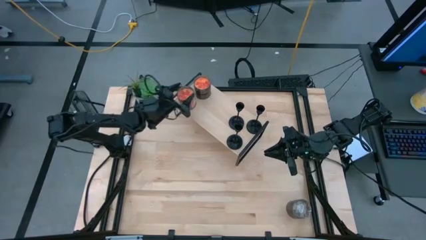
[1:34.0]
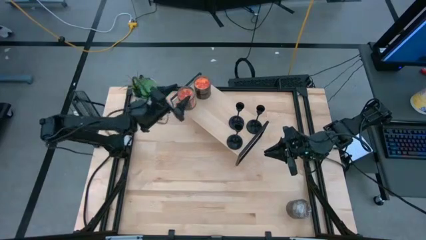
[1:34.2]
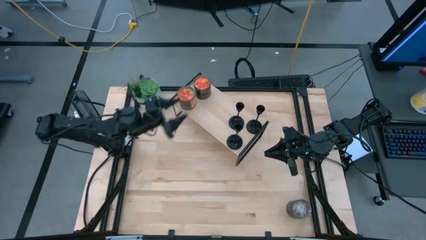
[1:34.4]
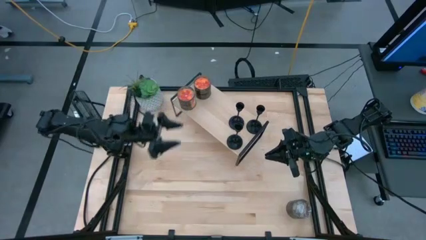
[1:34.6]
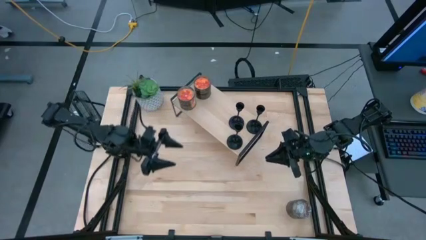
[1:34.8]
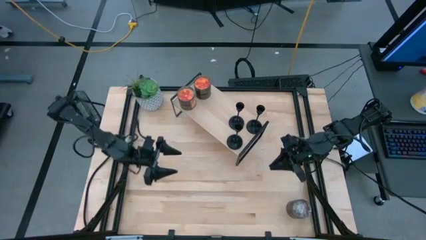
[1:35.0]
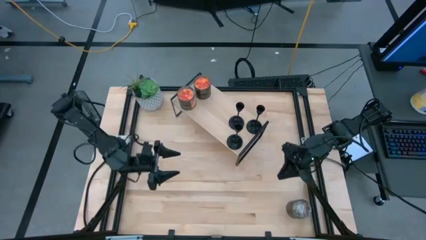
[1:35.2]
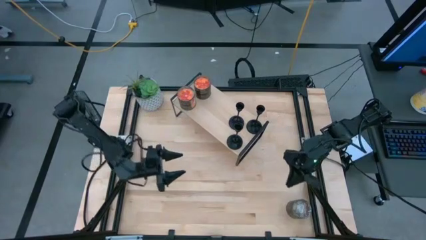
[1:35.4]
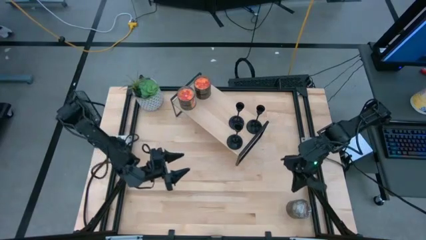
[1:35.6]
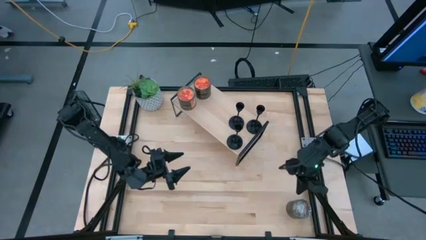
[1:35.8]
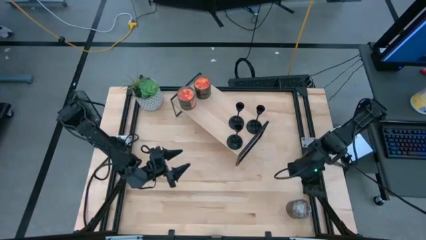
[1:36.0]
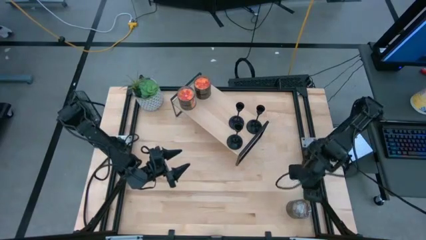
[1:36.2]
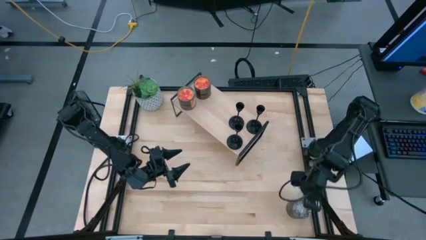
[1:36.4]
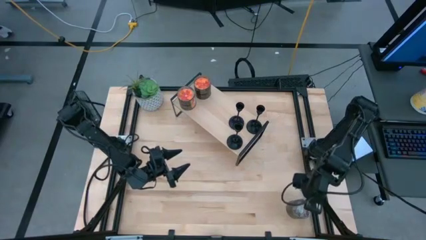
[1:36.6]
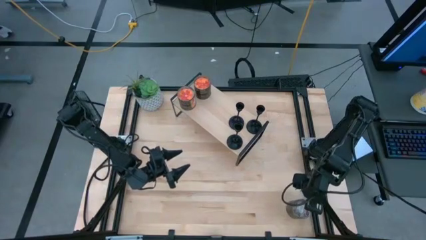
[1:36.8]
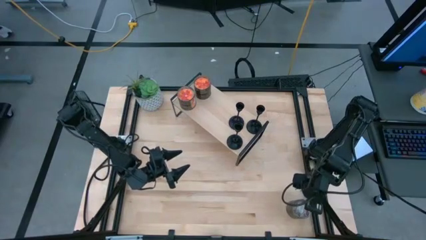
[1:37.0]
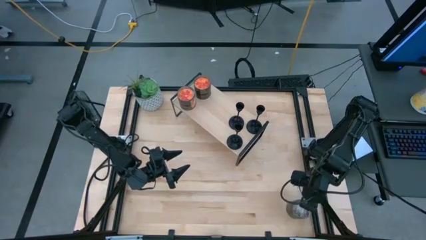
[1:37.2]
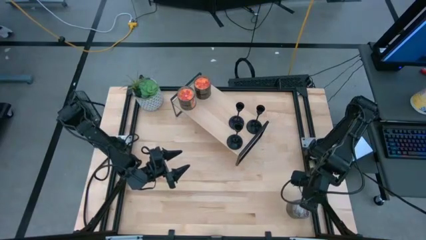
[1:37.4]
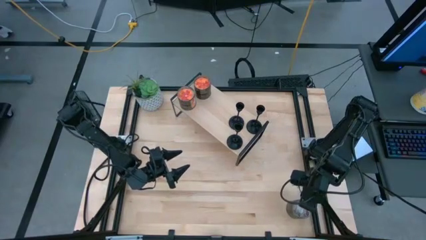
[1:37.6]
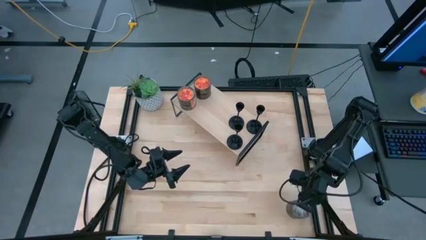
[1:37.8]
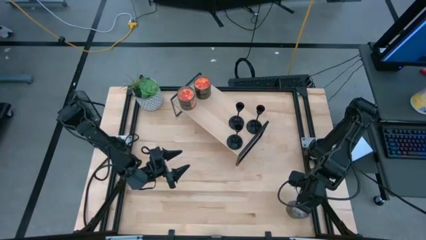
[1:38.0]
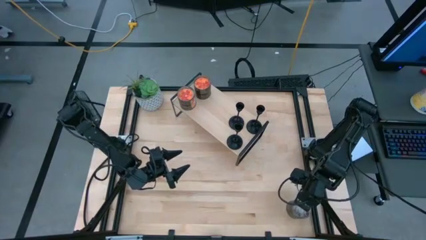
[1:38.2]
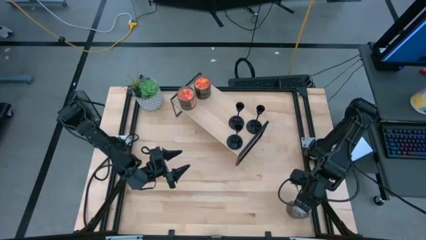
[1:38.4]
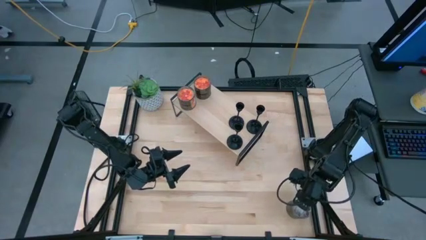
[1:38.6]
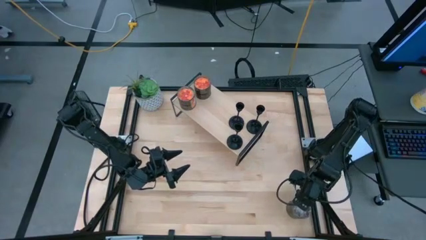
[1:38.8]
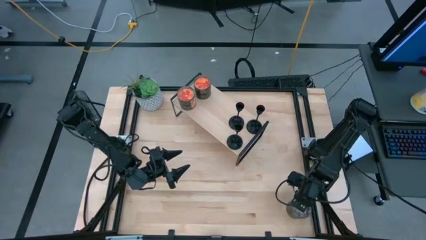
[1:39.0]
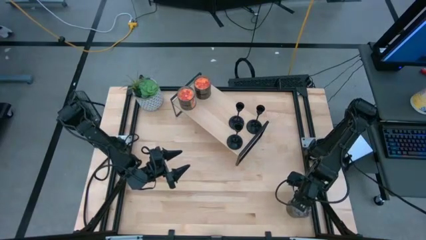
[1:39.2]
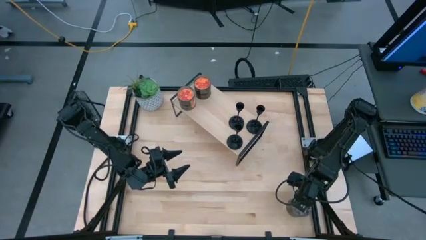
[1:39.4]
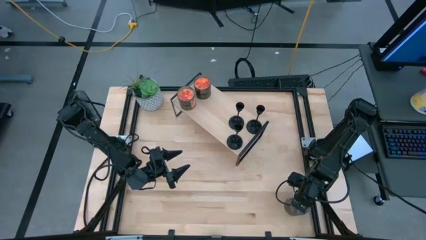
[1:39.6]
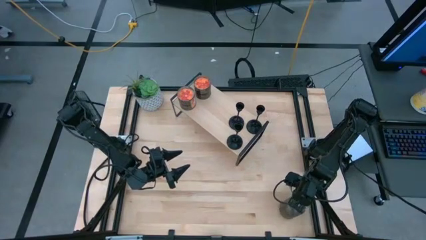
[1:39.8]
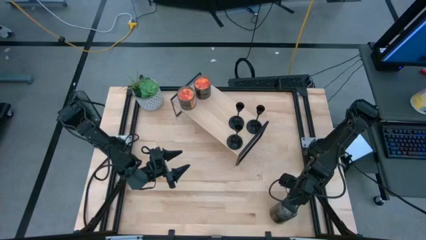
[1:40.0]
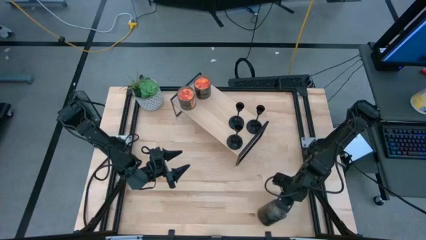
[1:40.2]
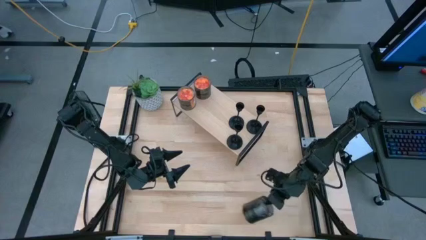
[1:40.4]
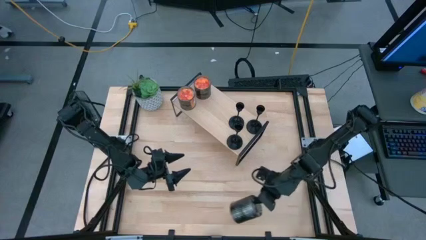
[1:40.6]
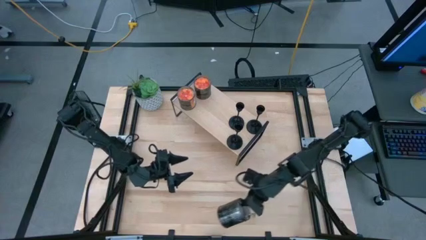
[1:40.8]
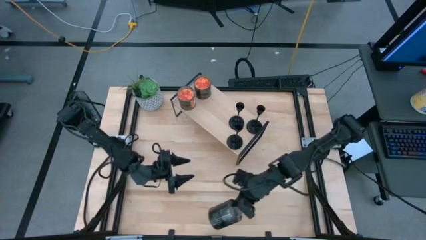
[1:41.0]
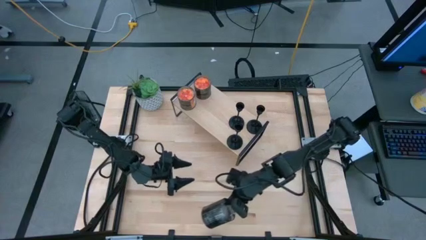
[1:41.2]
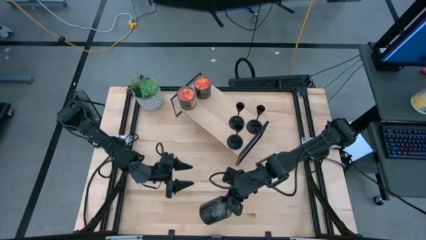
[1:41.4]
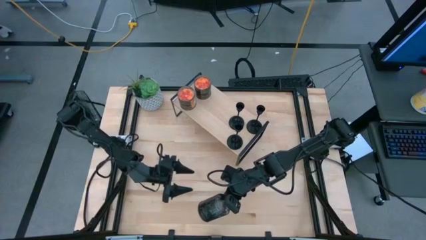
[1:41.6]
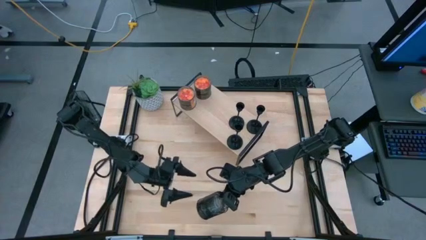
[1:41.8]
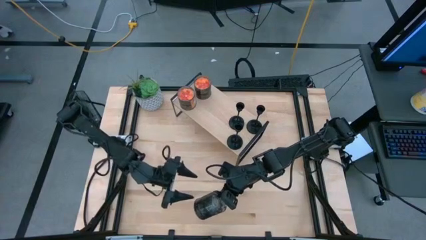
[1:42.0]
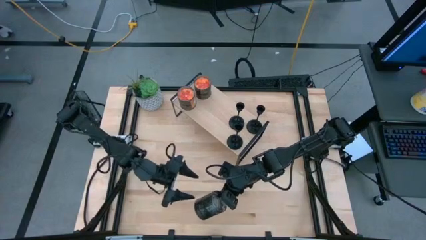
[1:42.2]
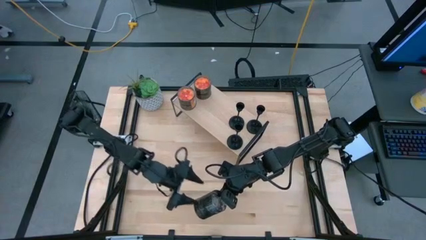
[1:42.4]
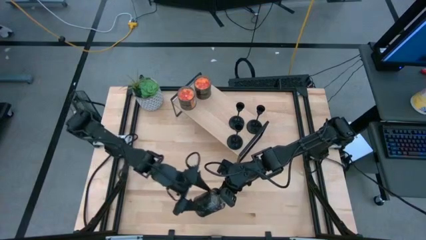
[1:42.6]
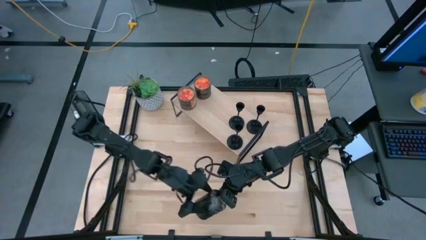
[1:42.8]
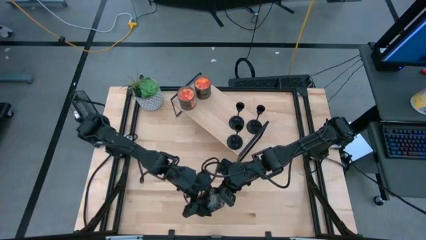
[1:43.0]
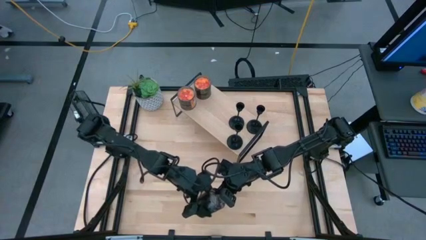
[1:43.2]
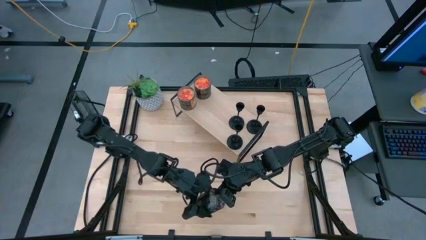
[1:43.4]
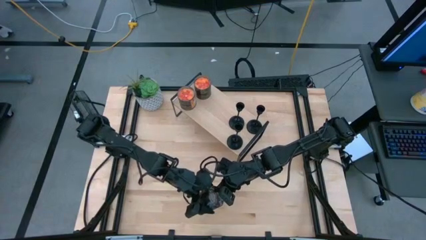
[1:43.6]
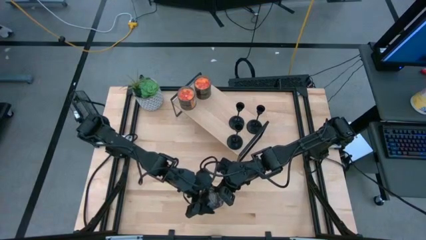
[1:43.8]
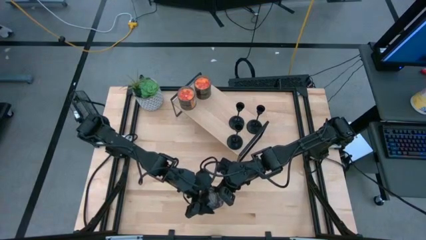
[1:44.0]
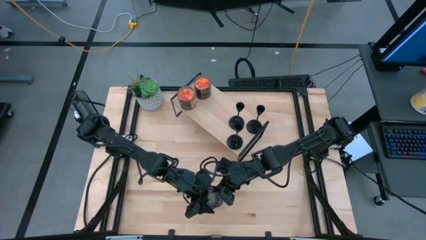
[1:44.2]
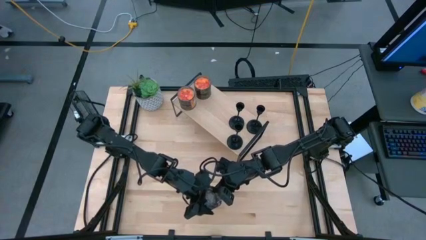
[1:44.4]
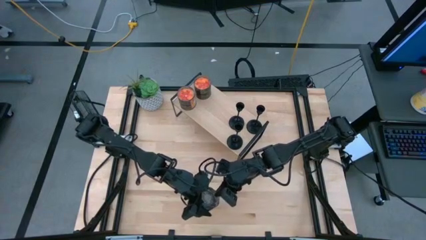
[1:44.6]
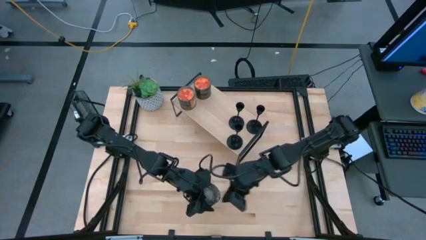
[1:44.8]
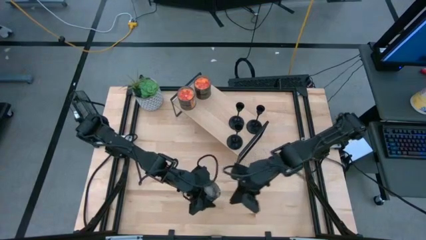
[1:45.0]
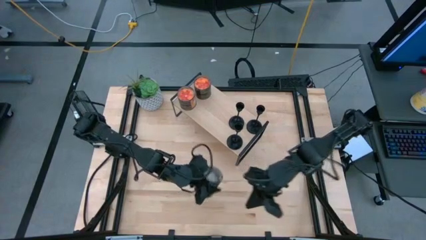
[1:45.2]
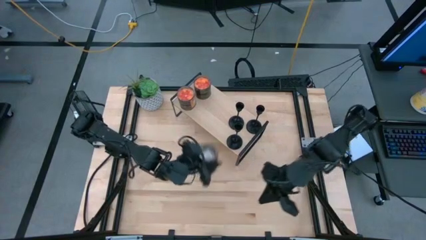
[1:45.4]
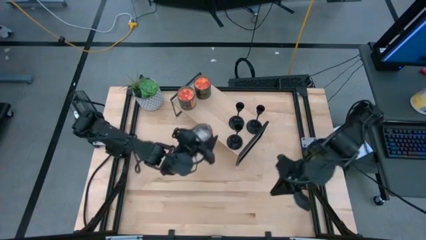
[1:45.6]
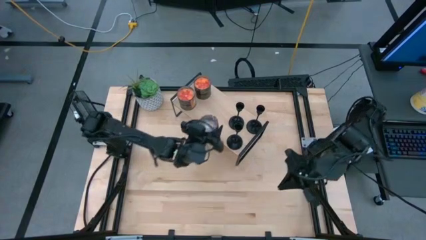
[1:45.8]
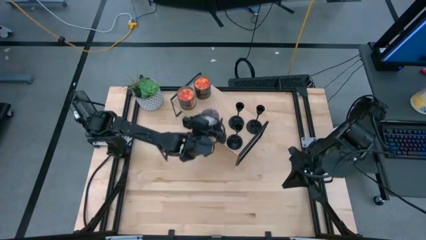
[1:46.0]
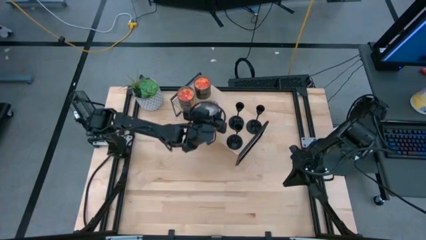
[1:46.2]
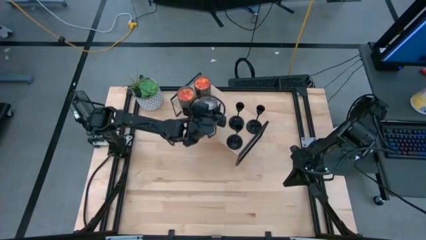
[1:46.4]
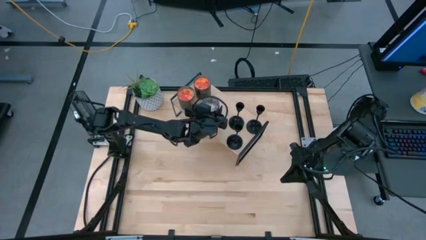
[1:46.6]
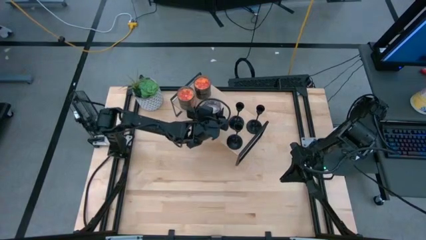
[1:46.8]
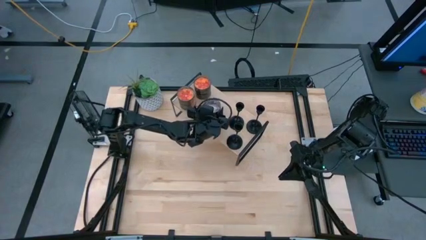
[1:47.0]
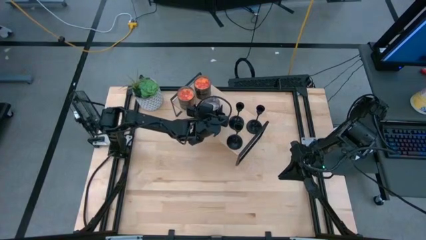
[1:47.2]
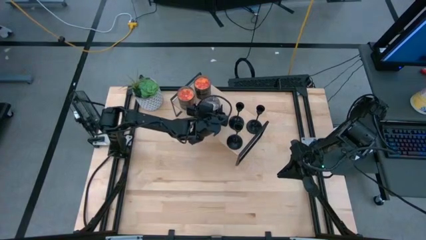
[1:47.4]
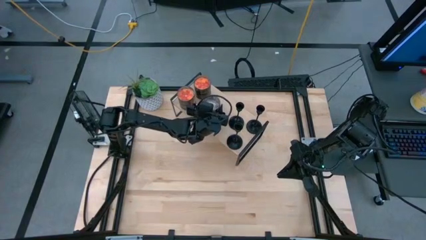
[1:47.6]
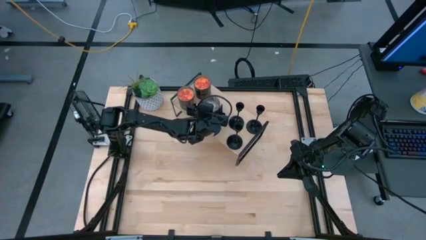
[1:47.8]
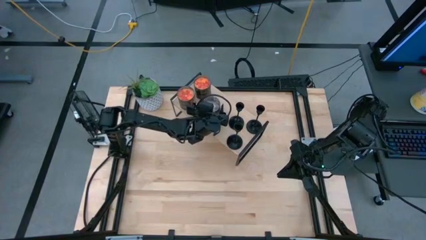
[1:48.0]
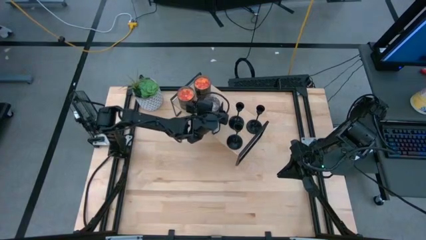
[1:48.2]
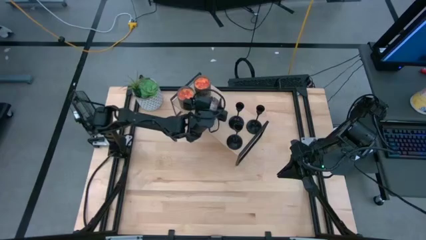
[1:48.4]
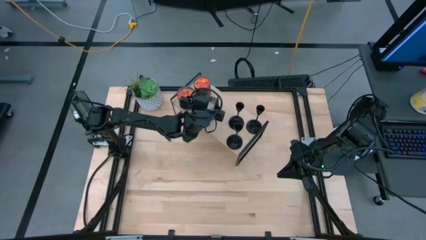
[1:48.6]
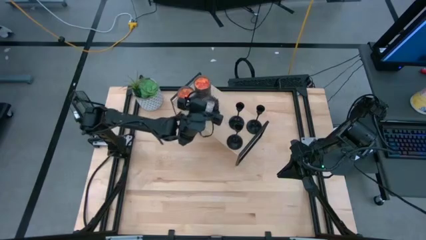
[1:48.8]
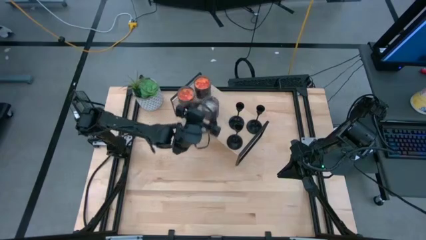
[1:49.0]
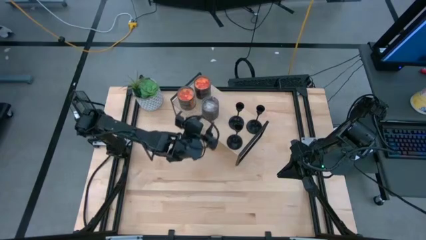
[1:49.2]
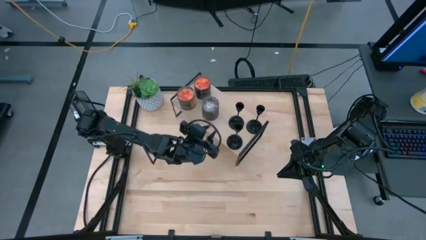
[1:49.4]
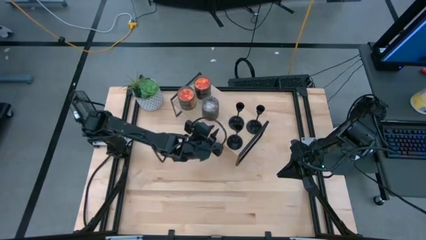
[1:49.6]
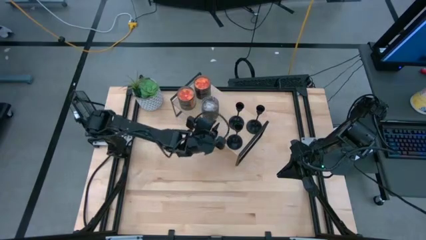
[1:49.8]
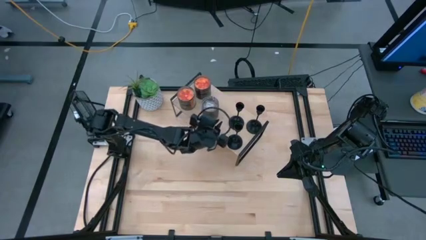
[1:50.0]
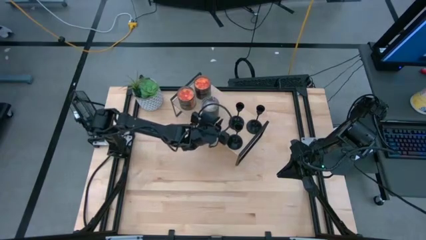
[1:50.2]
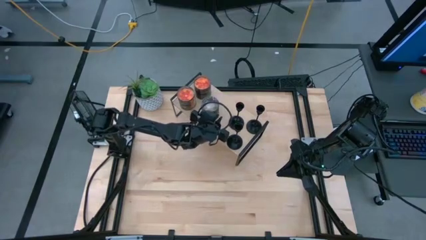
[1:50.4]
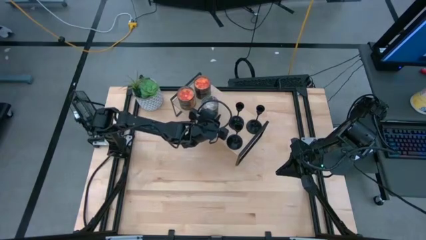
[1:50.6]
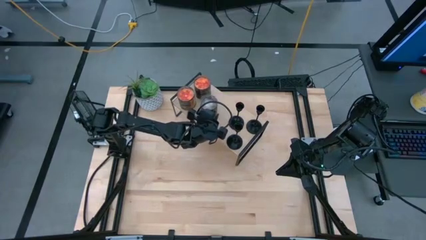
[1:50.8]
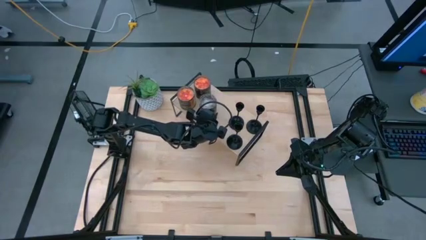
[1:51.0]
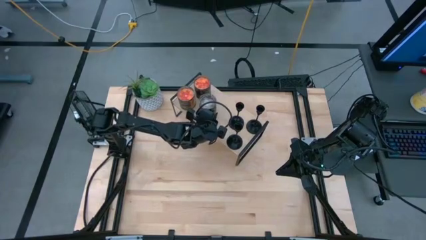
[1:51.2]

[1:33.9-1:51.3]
Task: Pick & Place candle stick holders
Put the white scented candle on the shelf
